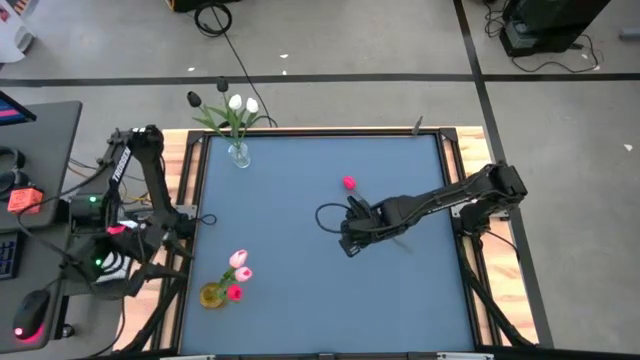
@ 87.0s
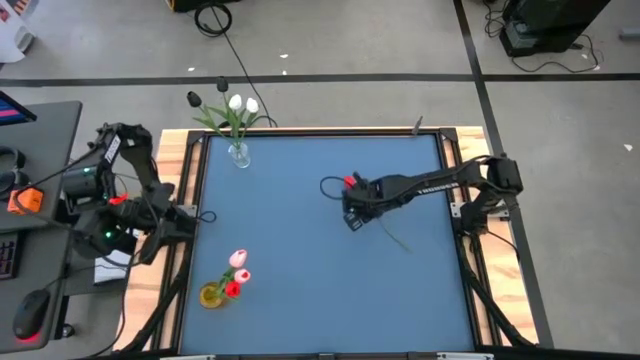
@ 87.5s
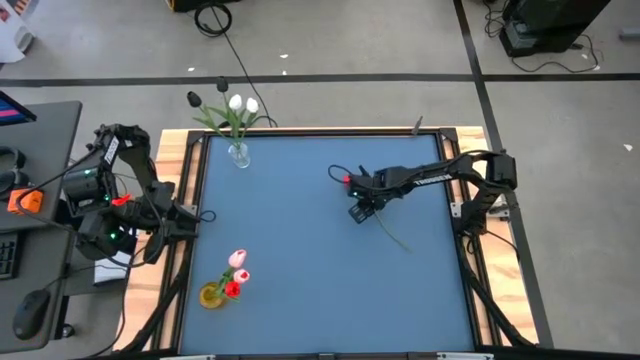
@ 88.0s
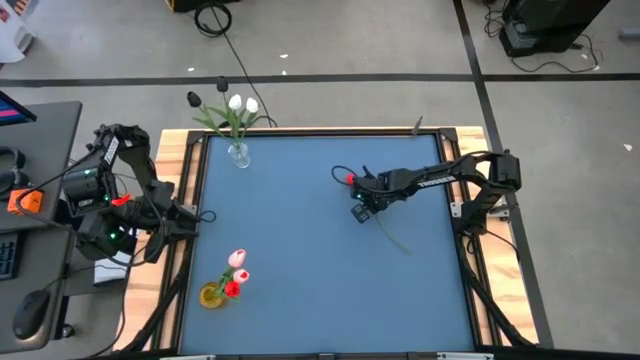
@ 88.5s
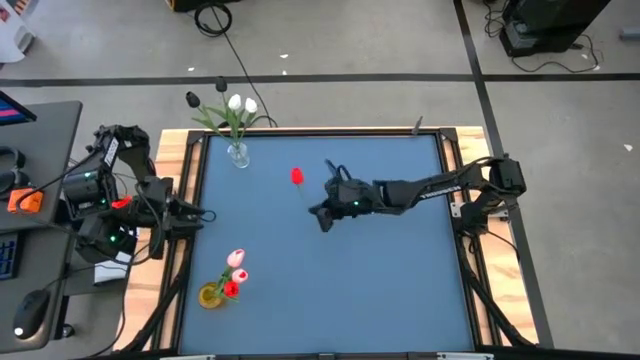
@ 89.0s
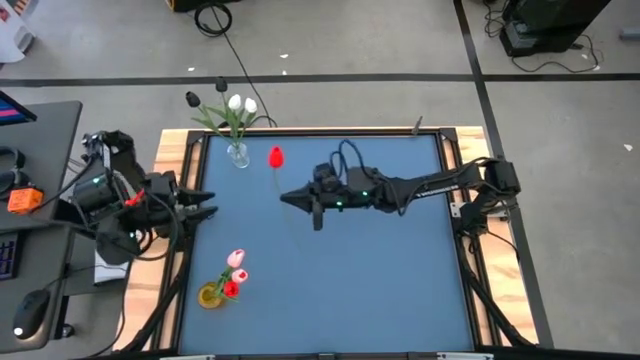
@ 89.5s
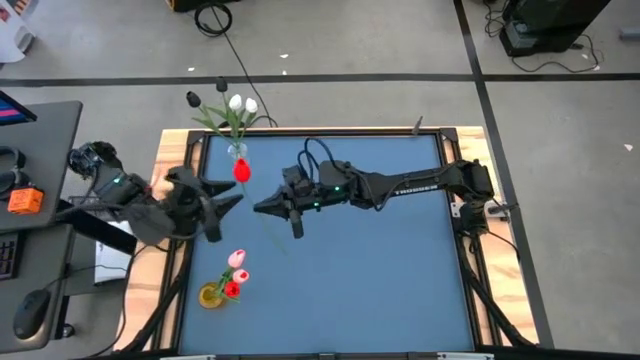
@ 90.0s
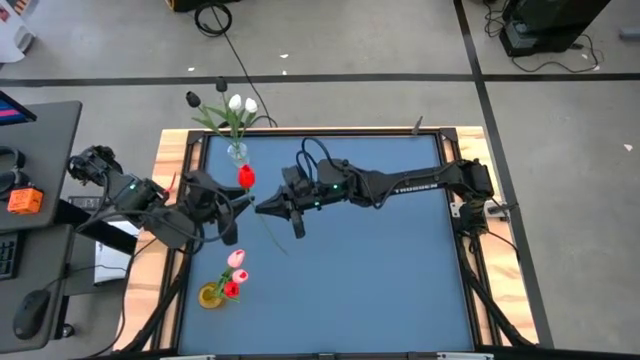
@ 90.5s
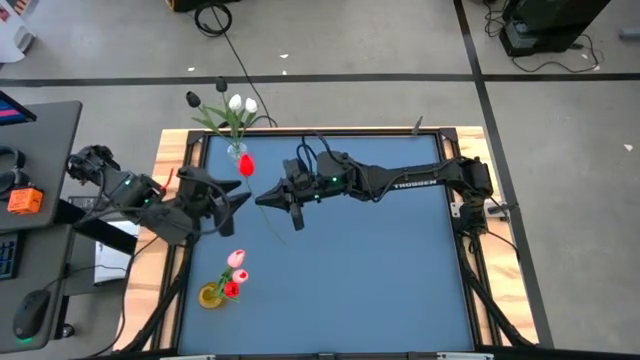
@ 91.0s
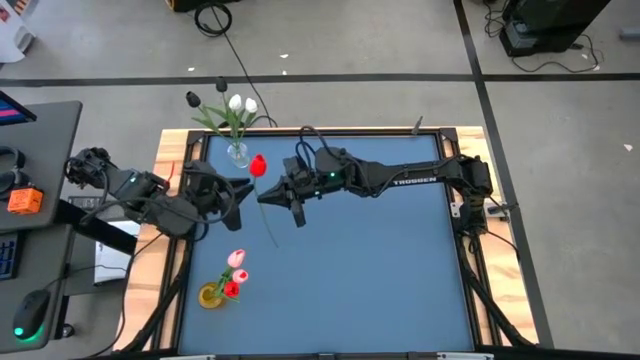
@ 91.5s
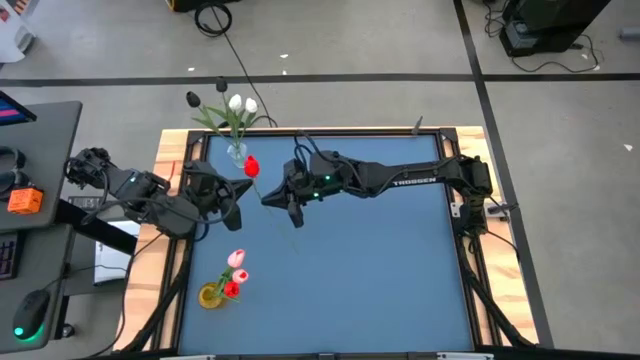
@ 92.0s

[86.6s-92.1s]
Task: Sort flowers into vase by color
Put the red tulip into the yellow vase

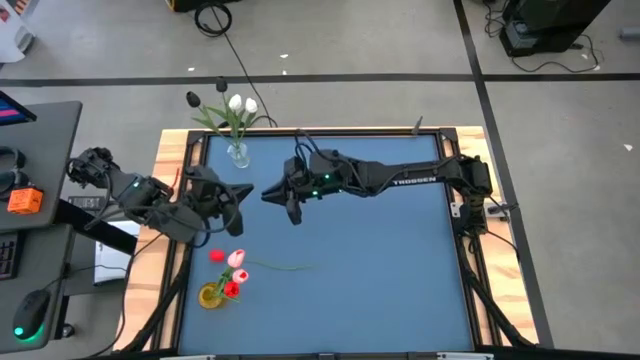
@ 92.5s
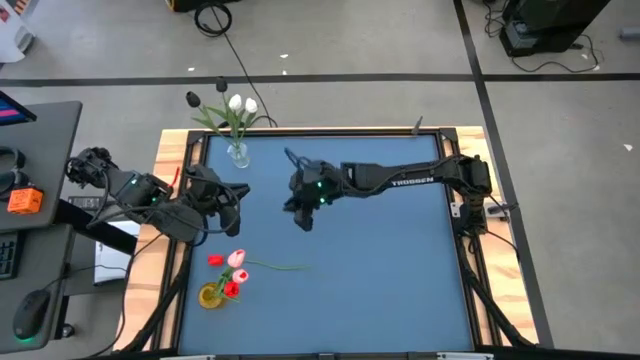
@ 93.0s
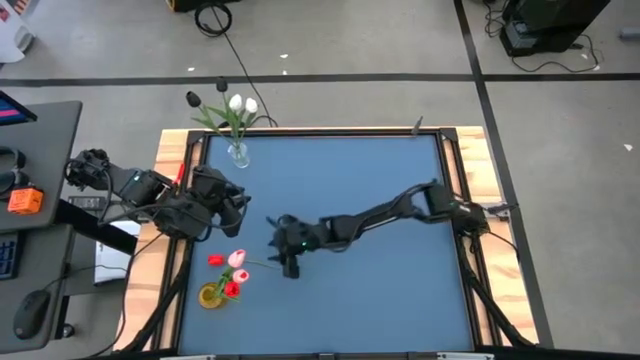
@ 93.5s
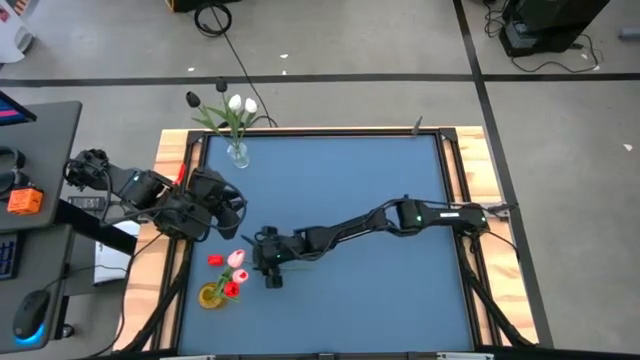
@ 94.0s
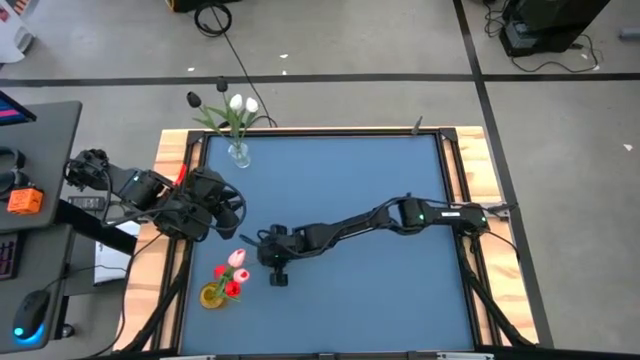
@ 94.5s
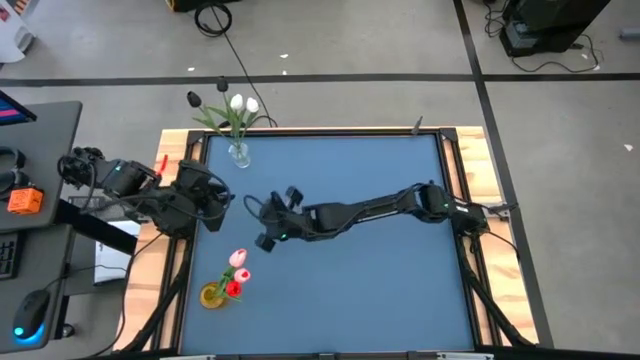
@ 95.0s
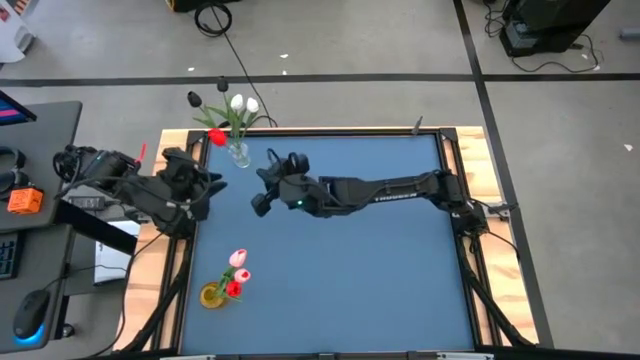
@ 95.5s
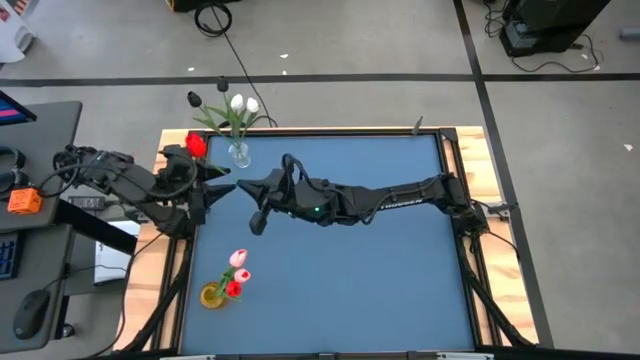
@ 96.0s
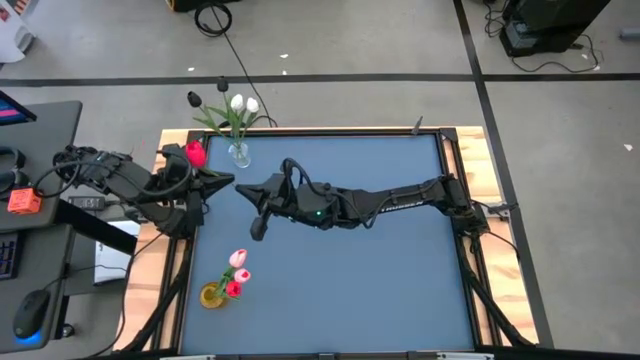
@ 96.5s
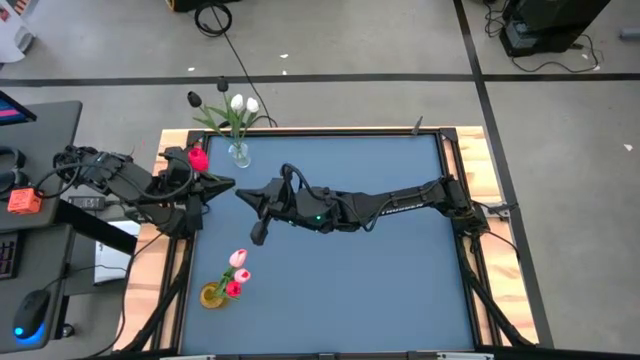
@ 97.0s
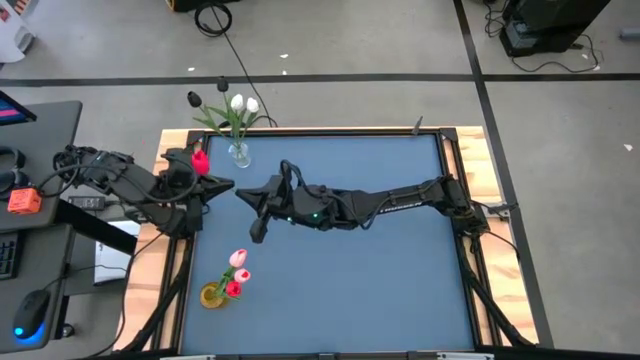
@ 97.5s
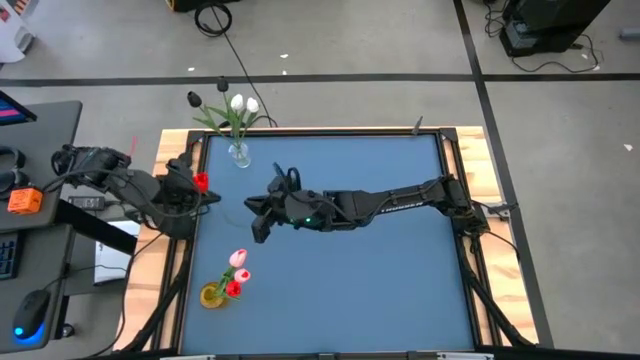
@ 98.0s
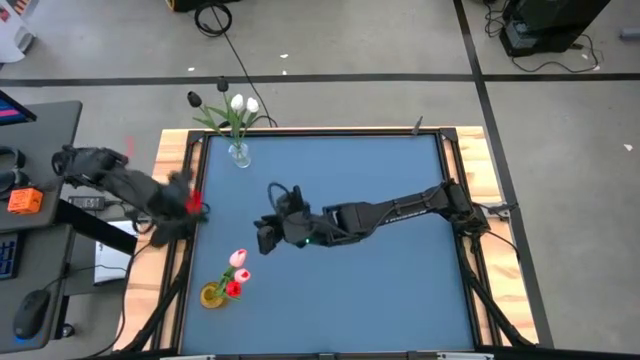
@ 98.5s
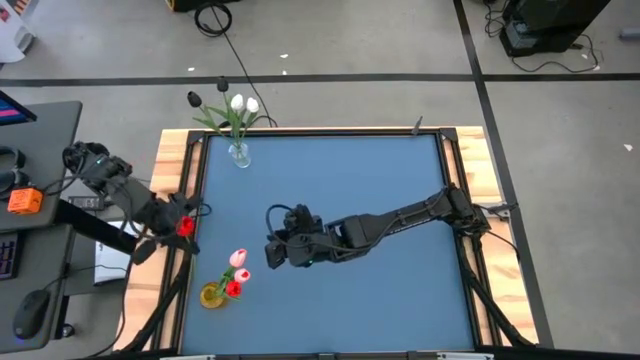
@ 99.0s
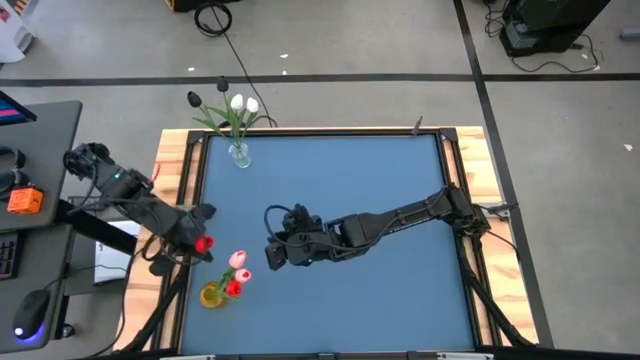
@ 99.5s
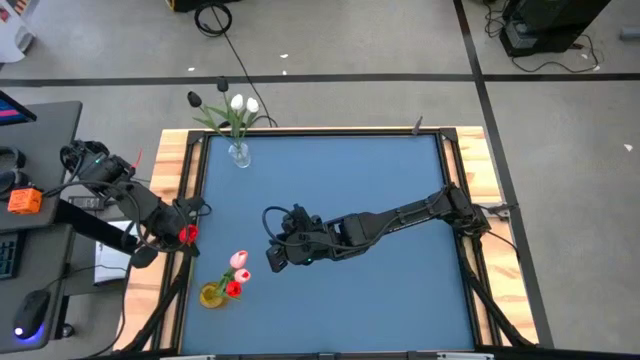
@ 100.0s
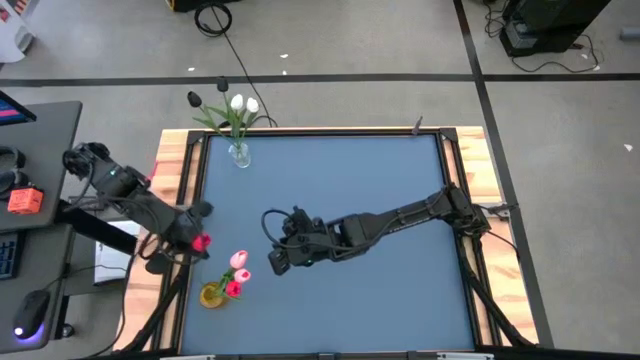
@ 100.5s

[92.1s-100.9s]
Put the red tulip into the yellow vase

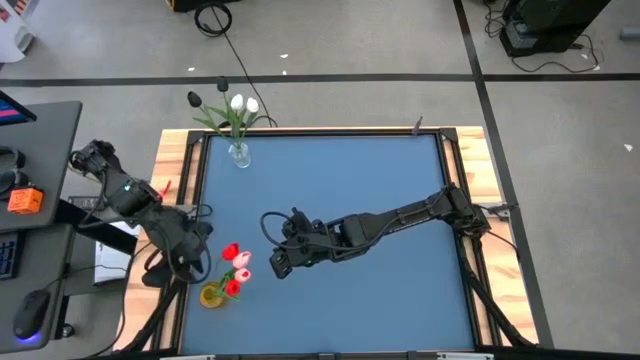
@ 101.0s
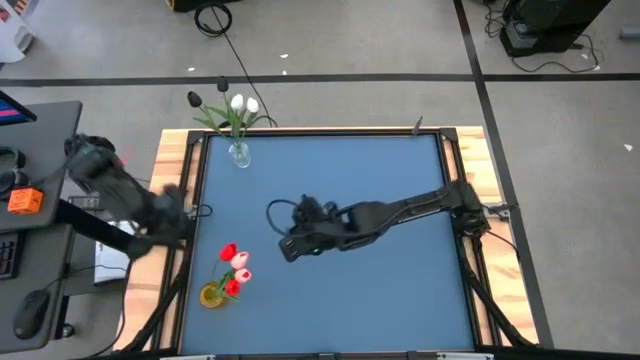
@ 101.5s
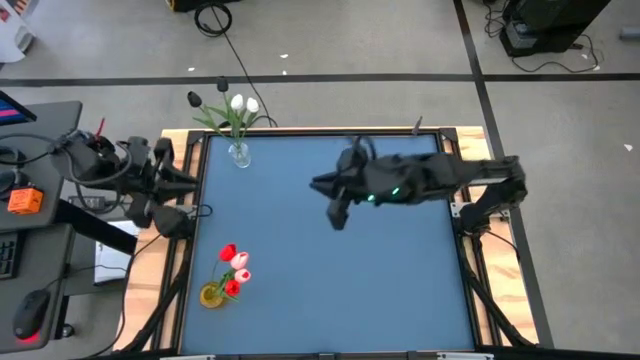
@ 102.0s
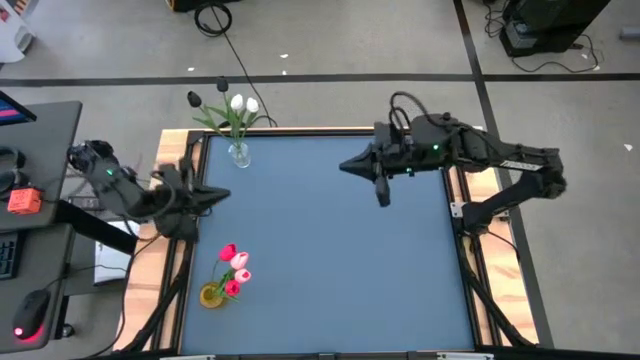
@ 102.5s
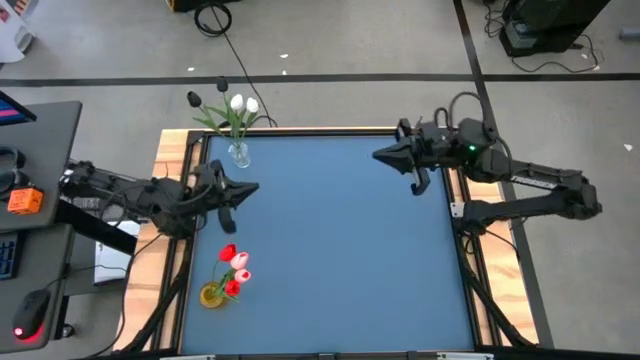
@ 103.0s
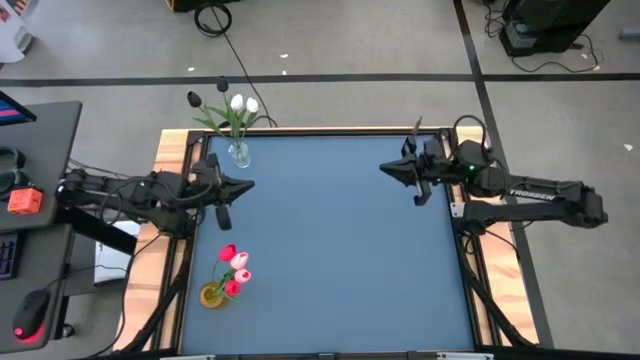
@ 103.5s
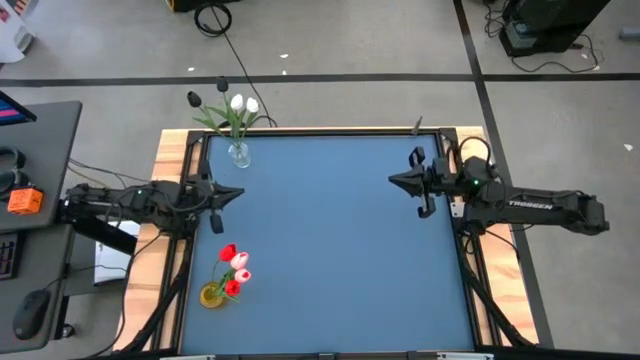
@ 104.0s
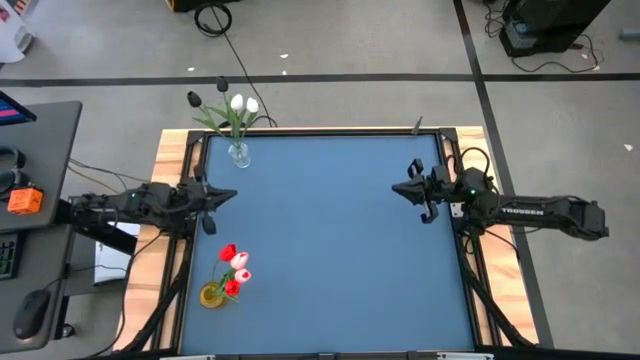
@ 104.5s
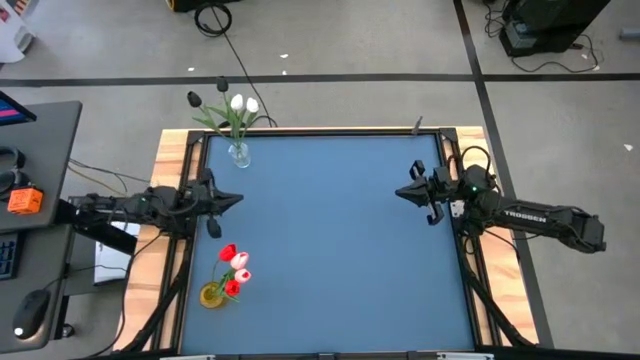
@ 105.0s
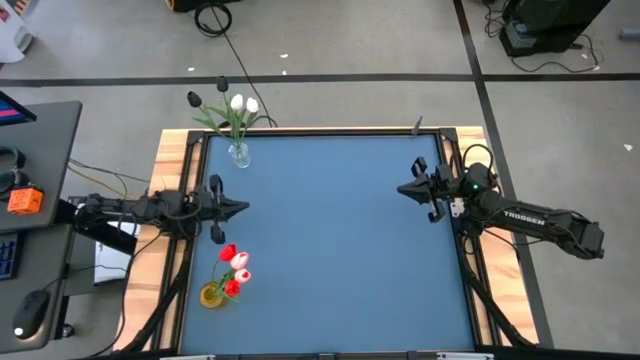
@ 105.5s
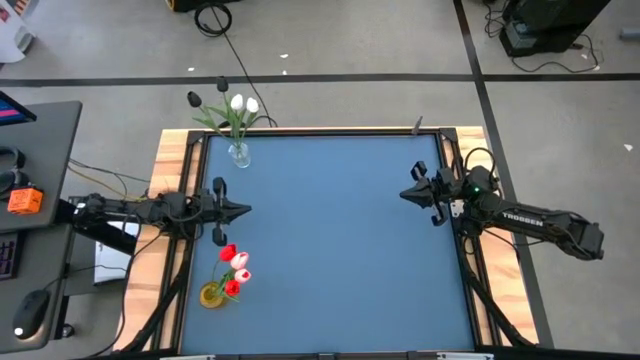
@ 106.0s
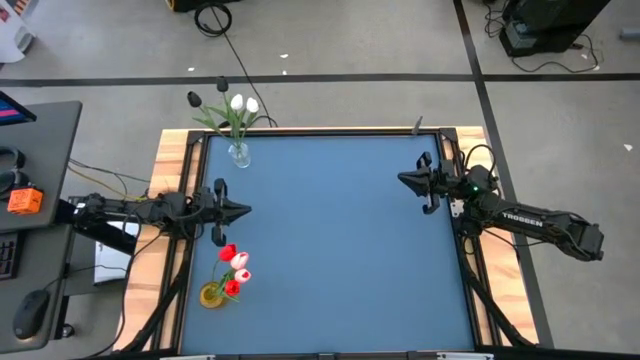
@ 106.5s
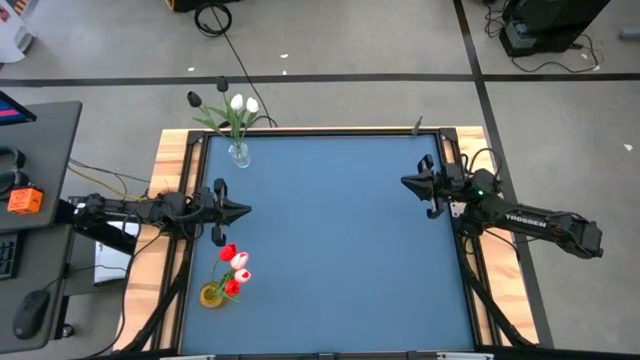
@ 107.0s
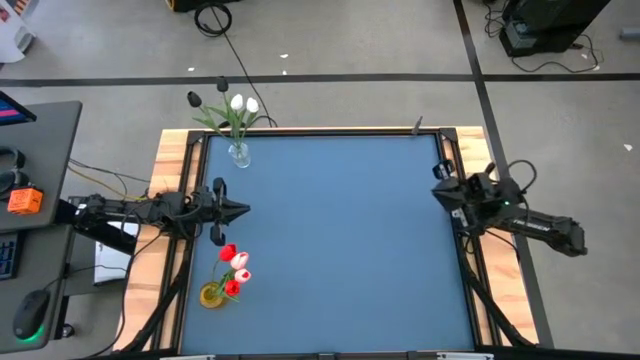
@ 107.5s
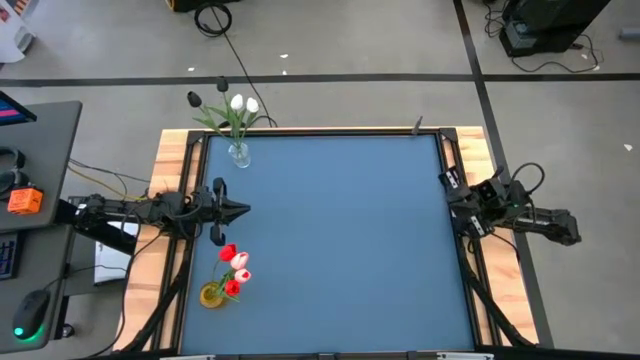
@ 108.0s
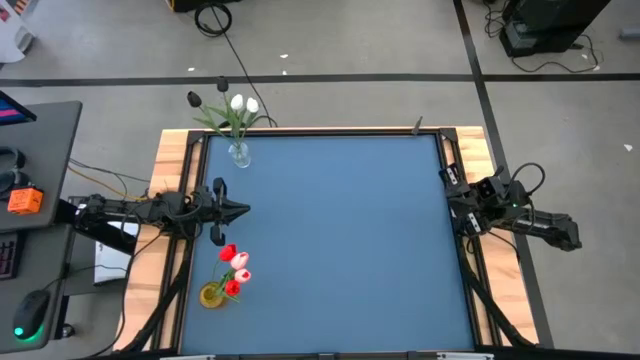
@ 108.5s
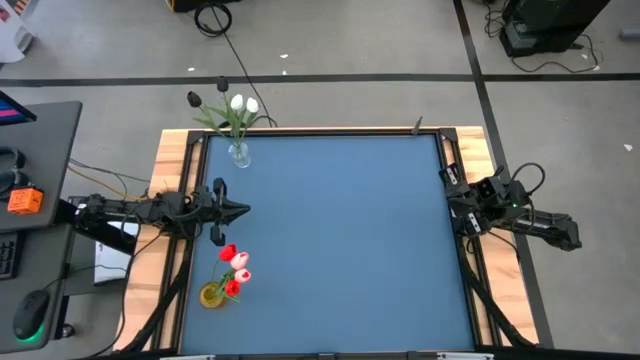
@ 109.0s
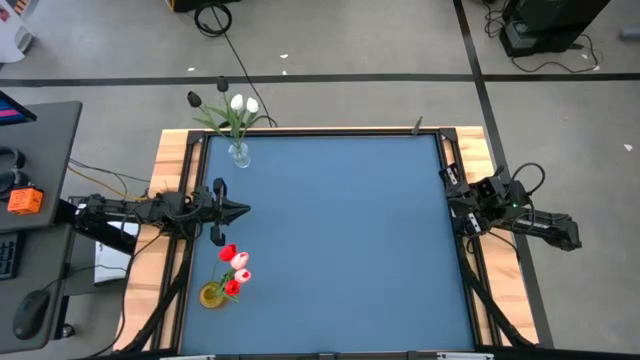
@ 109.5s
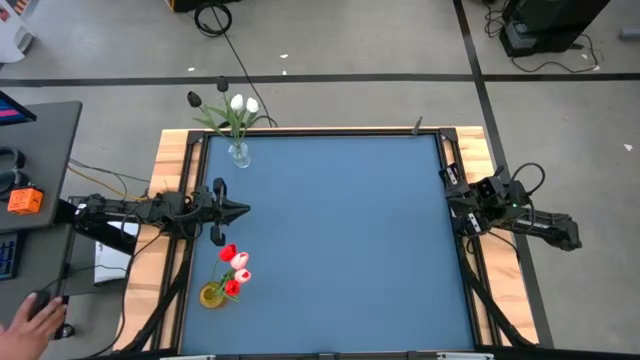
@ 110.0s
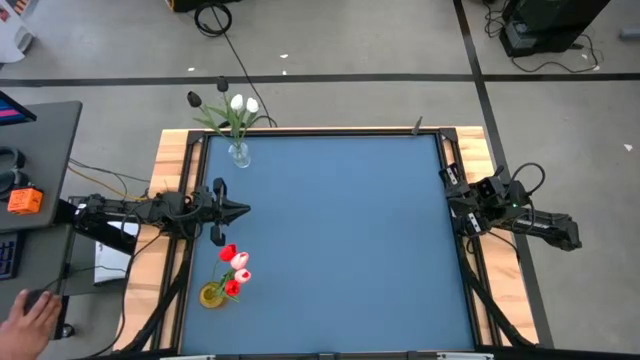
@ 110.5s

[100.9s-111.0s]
Return to Home Position
